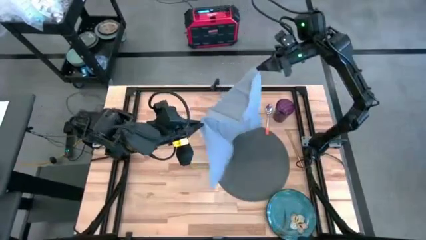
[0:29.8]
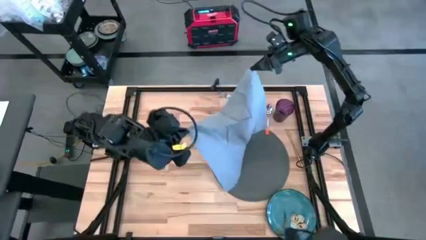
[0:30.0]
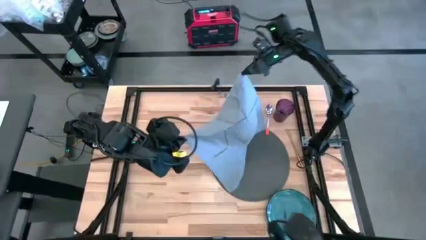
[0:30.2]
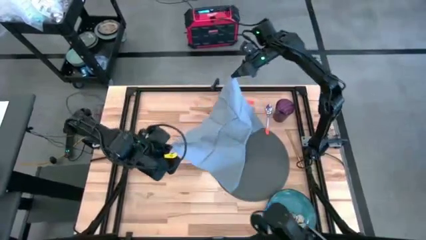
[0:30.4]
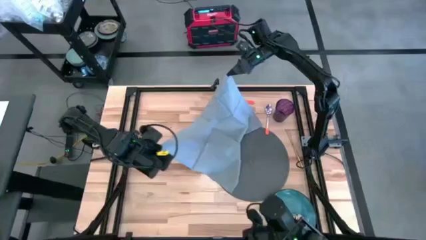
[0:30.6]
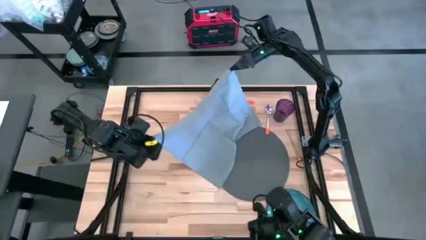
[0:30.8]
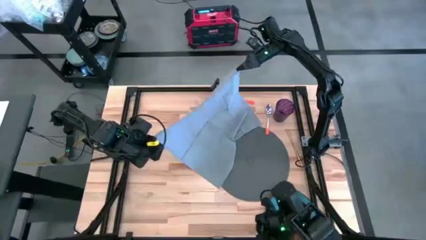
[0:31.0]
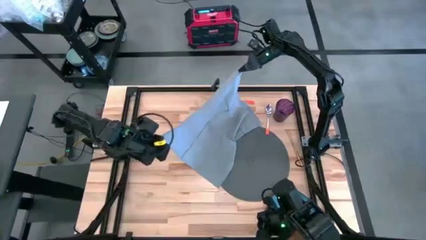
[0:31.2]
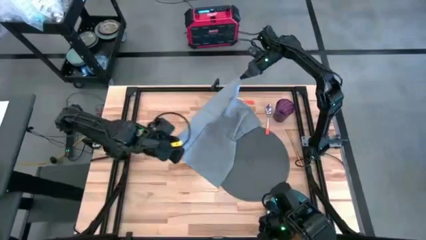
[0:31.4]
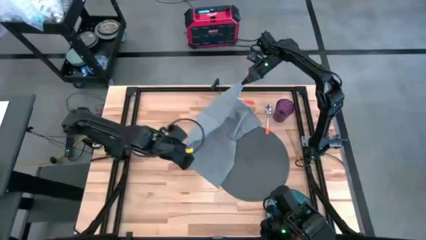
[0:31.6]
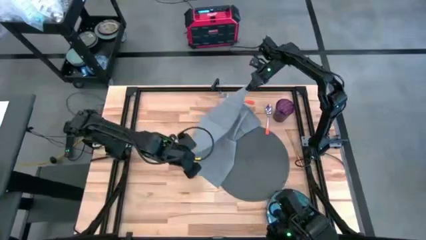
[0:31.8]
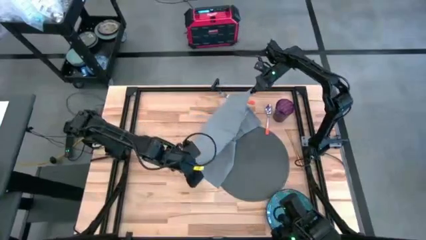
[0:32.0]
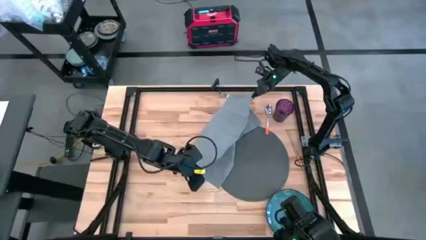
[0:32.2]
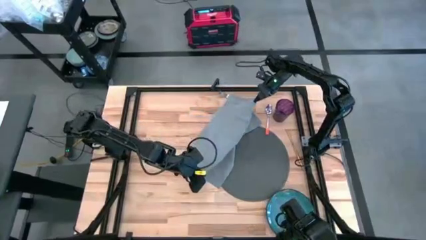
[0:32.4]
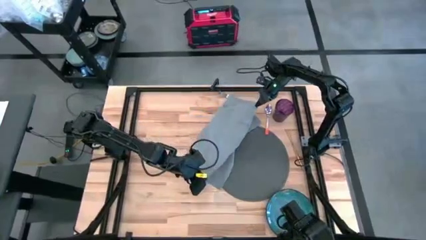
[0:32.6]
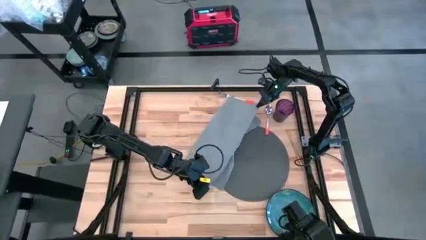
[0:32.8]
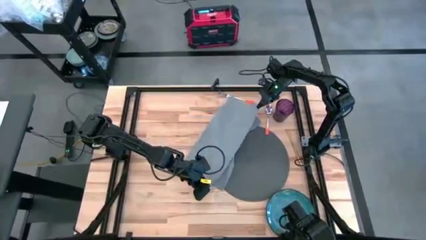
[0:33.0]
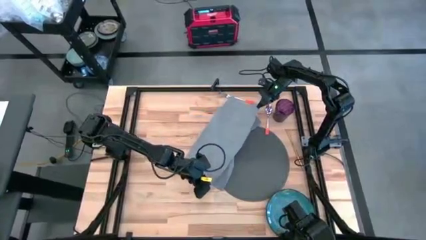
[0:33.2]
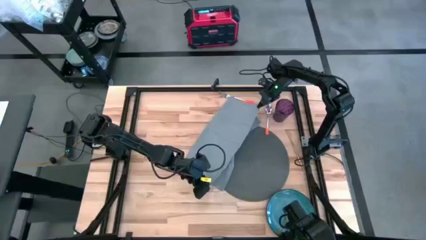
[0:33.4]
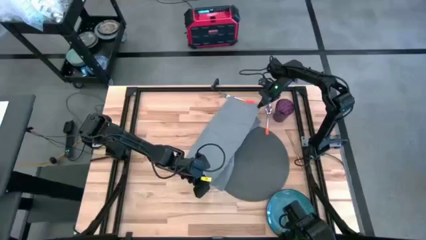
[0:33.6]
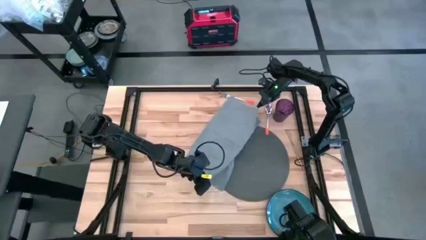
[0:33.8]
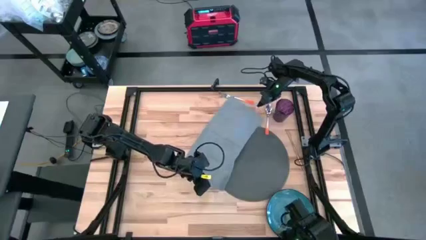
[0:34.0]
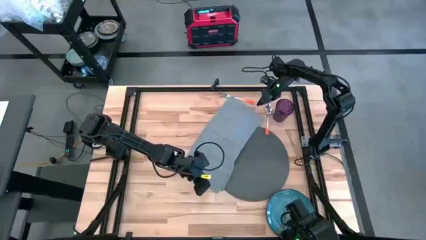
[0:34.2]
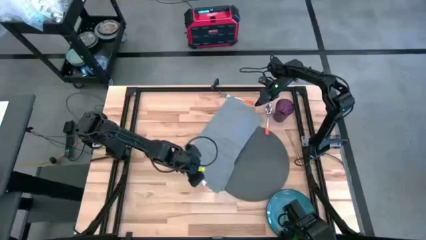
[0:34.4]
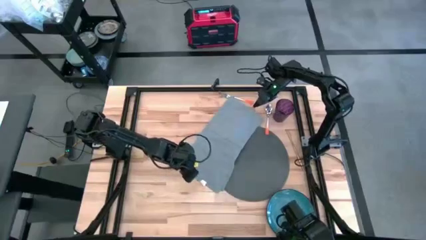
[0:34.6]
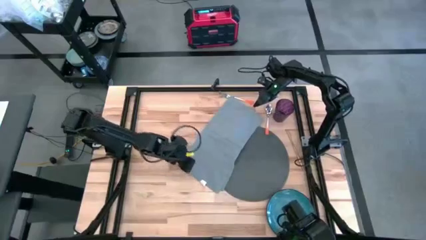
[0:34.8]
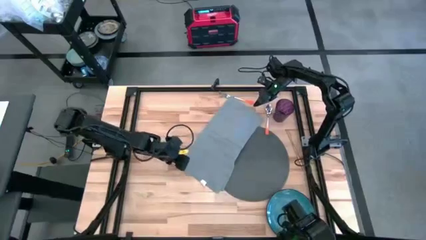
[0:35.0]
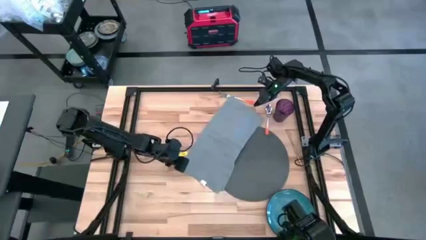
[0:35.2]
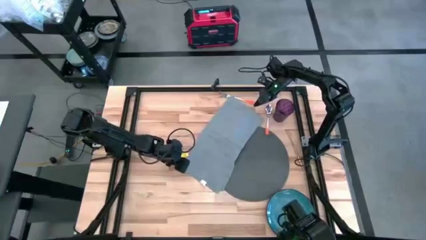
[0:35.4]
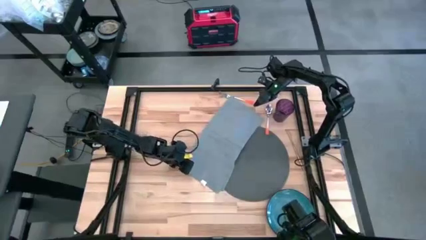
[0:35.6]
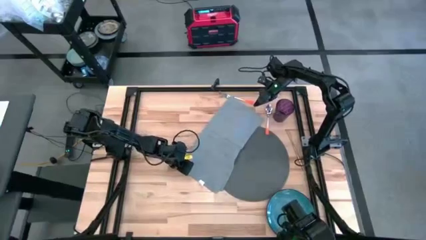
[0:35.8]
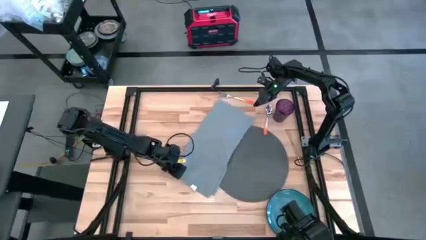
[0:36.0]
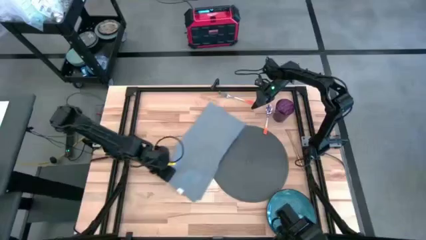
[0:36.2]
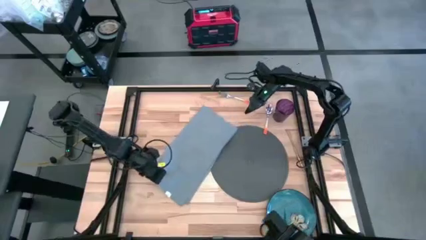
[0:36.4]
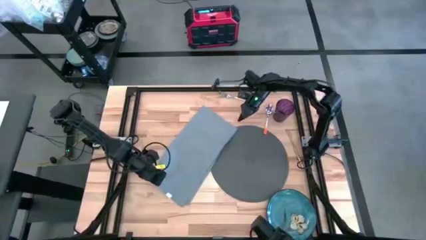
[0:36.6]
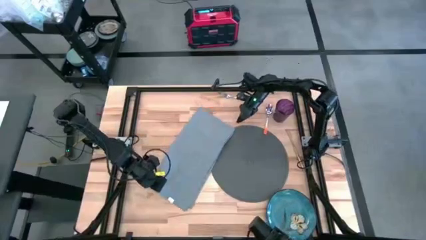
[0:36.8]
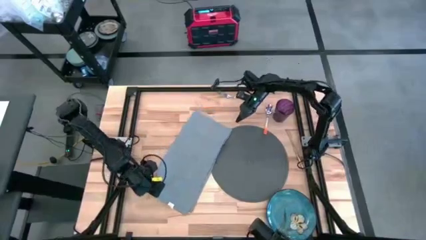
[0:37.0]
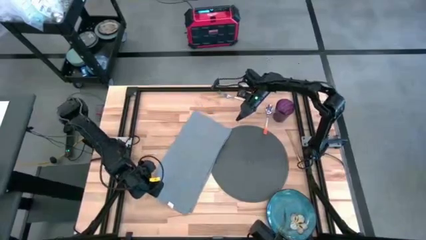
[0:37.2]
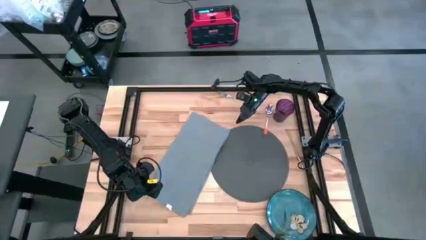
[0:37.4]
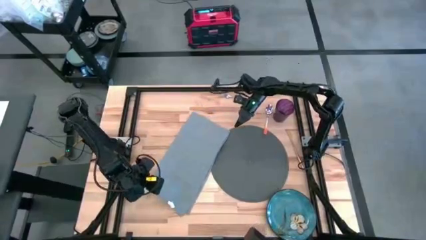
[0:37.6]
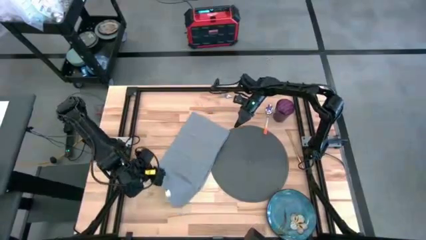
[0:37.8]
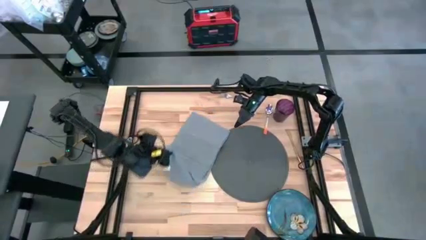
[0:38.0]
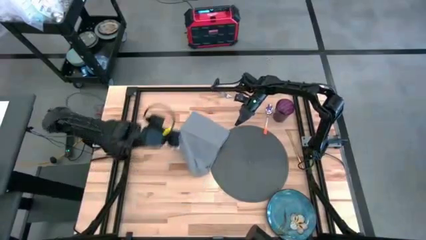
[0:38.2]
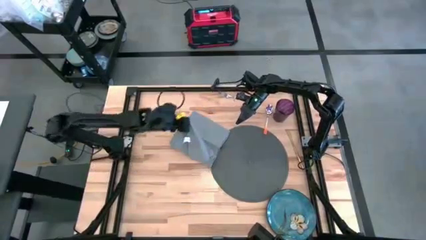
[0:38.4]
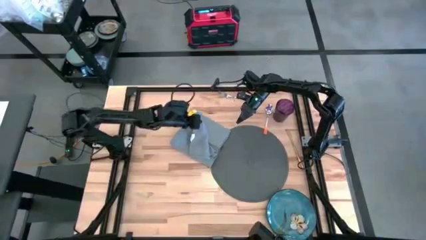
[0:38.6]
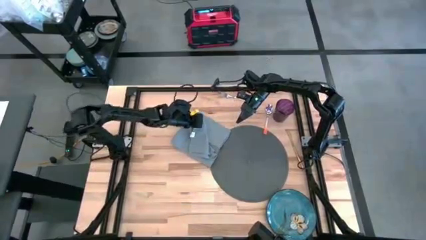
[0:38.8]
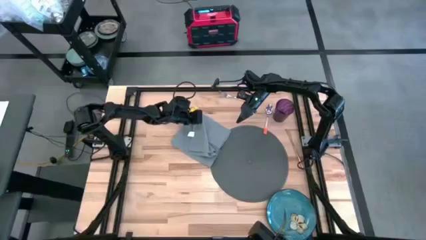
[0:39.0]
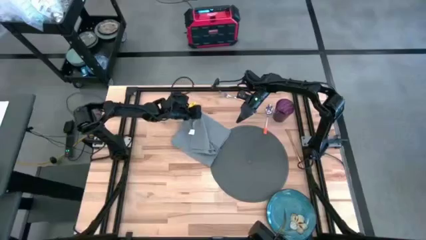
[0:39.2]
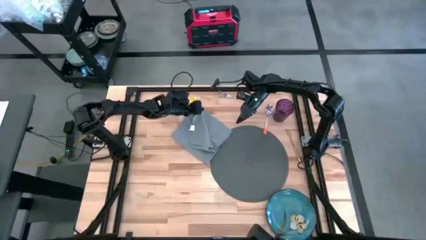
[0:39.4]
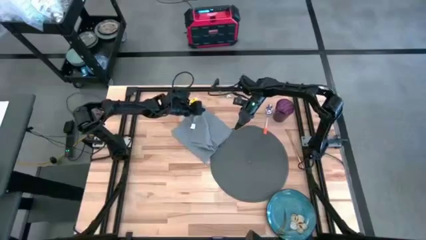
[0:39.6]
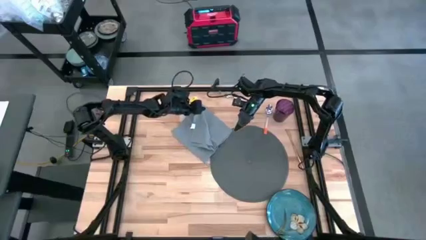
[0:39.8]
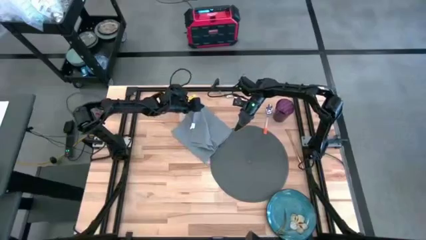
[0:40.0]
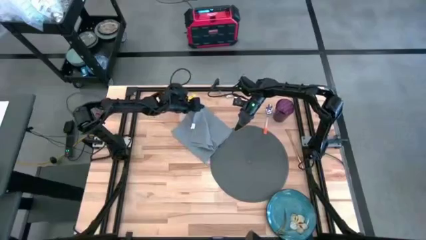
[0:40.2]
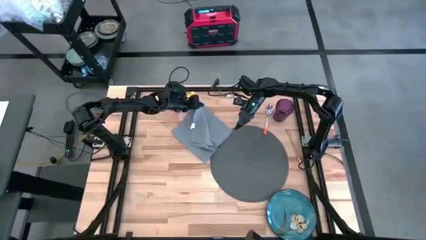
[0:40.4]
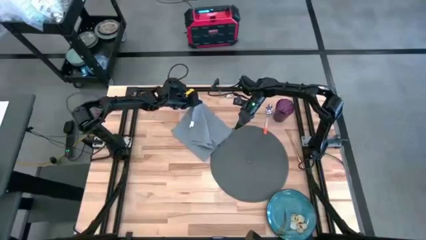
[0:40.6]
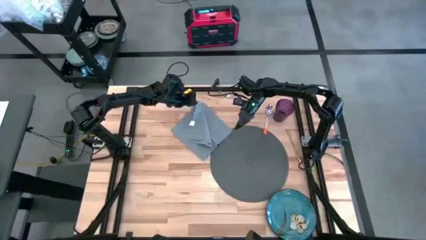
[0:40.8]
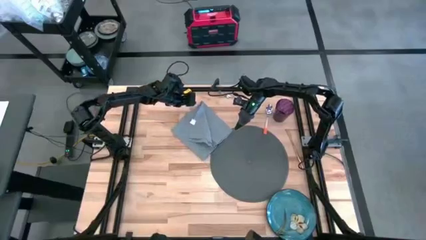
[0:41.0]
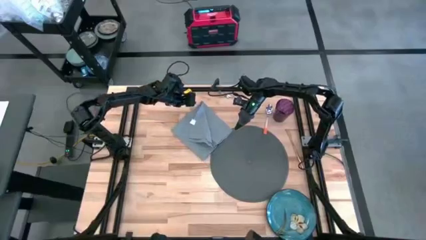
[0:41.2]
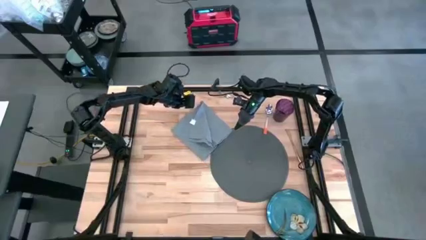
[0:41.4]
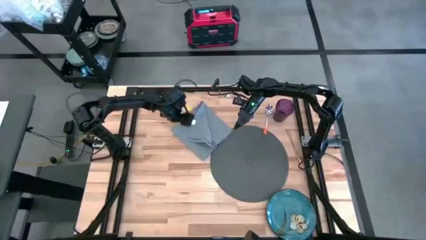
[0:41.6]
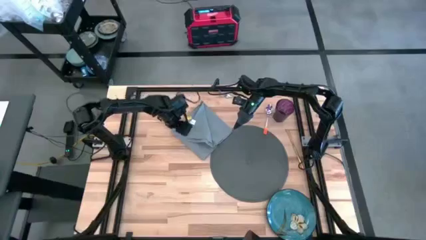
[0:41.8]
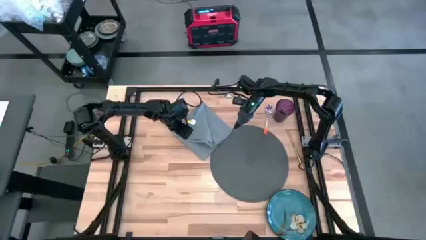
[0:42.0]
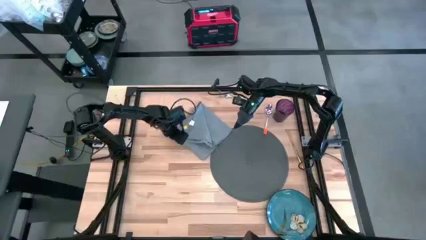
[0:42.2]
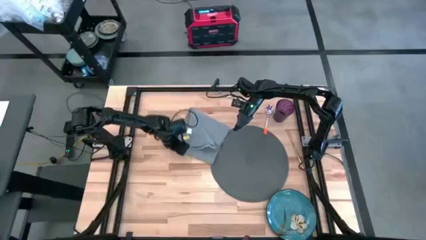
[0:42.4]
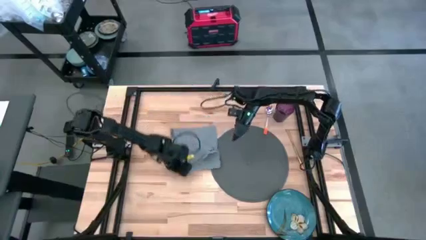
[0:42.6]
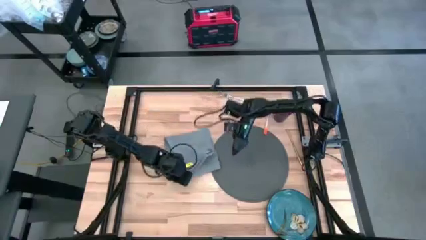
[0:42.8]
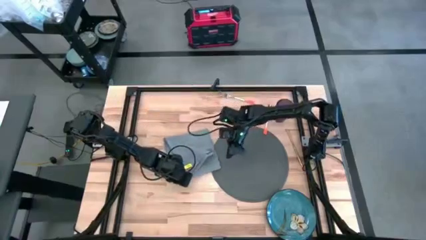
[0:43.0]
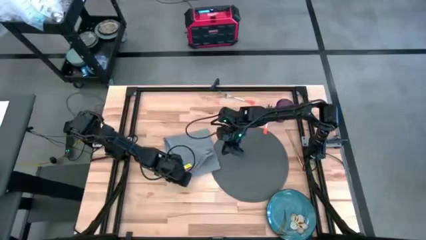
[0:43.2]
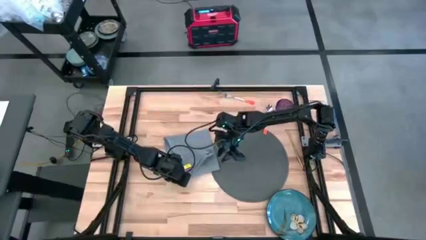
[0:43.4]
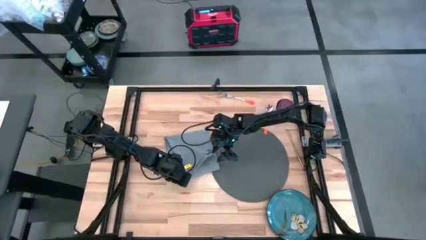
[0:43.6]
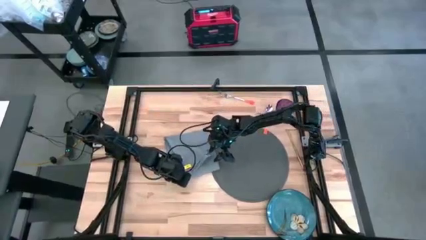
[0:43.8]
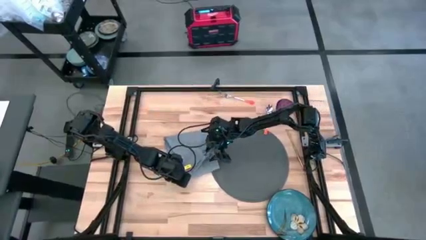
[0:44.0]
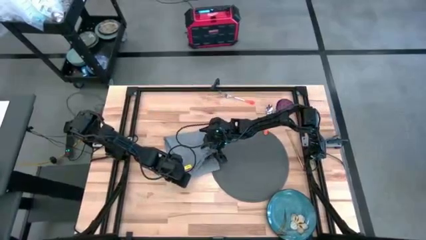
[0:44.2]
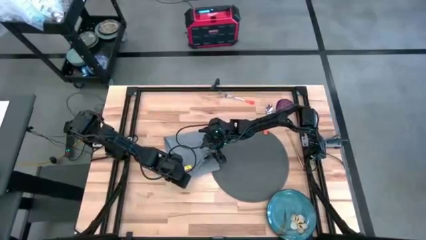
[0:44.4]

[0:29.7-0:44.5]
Task: Set table place
Fold the light gray table napkin on the table
